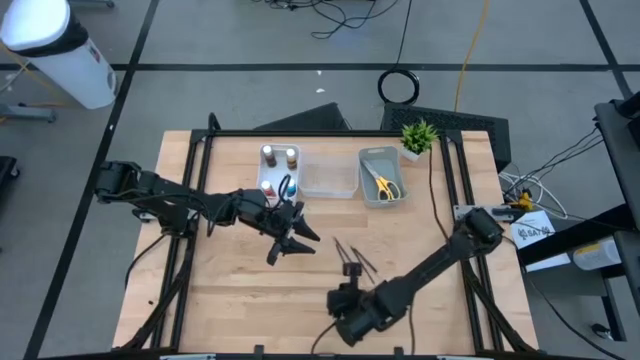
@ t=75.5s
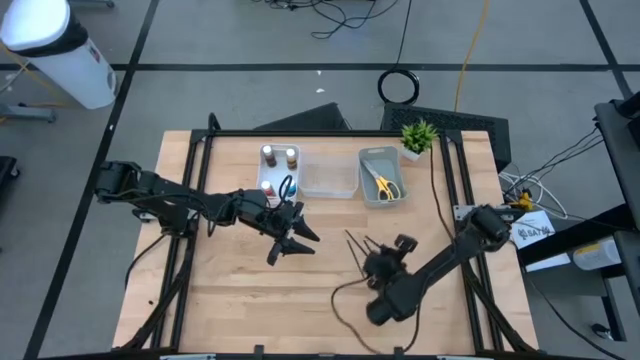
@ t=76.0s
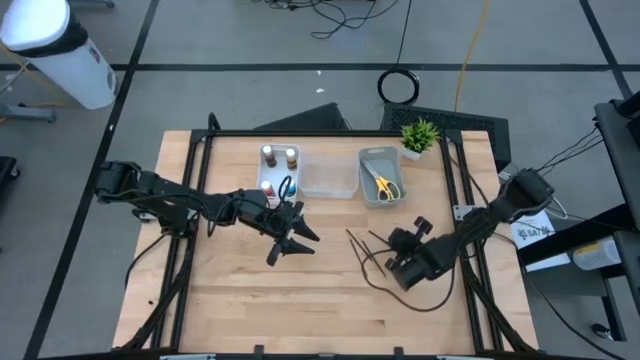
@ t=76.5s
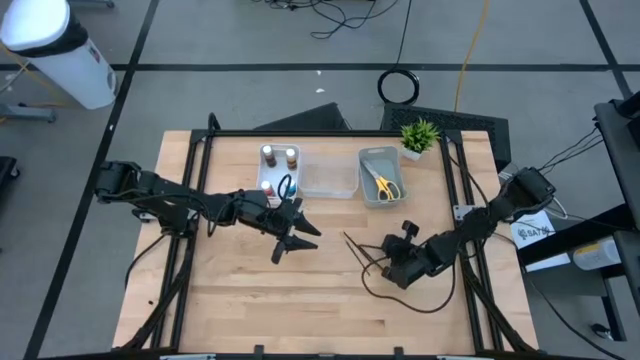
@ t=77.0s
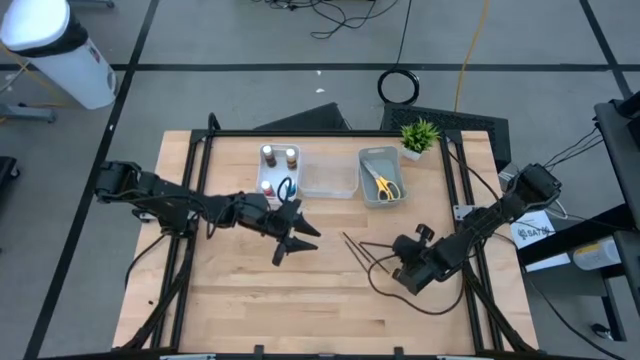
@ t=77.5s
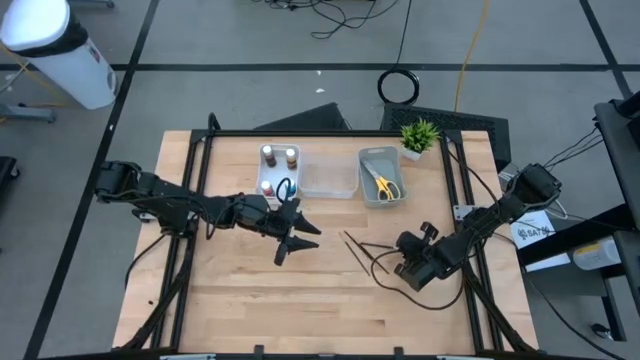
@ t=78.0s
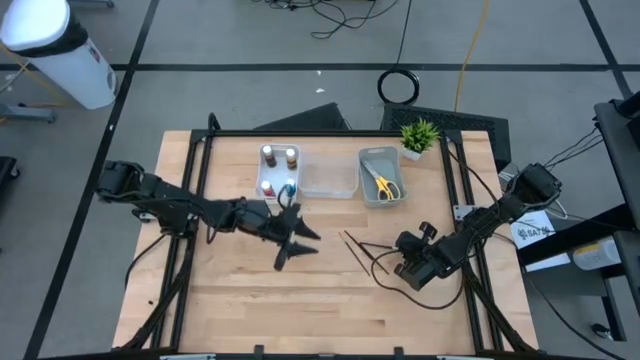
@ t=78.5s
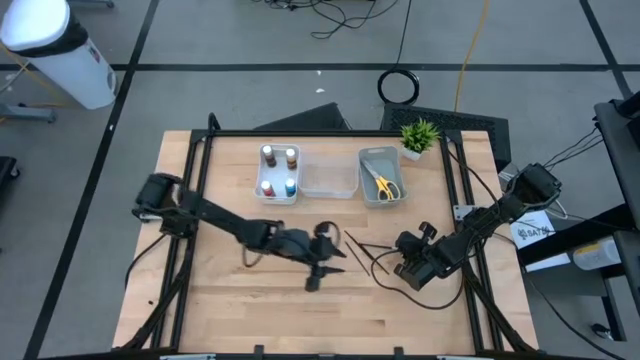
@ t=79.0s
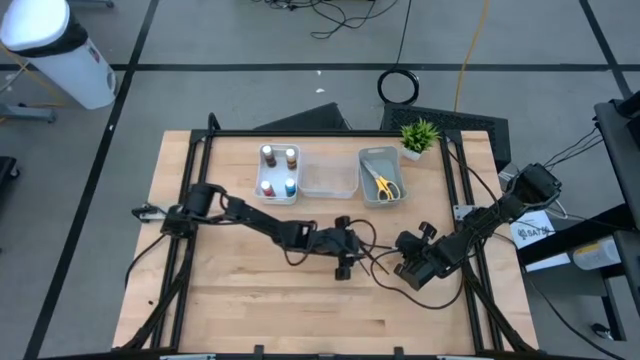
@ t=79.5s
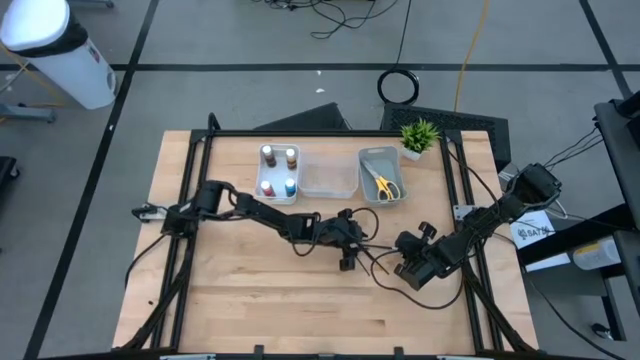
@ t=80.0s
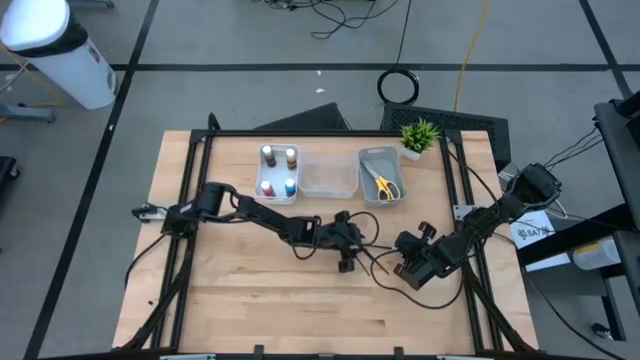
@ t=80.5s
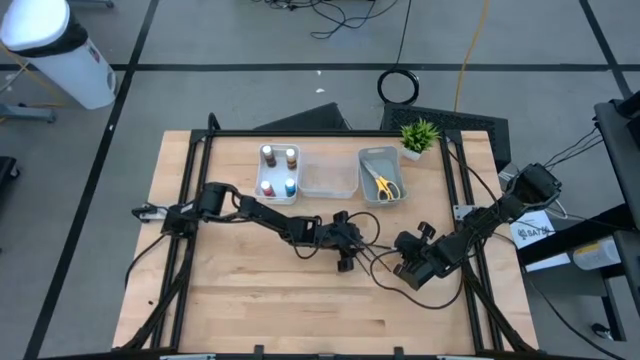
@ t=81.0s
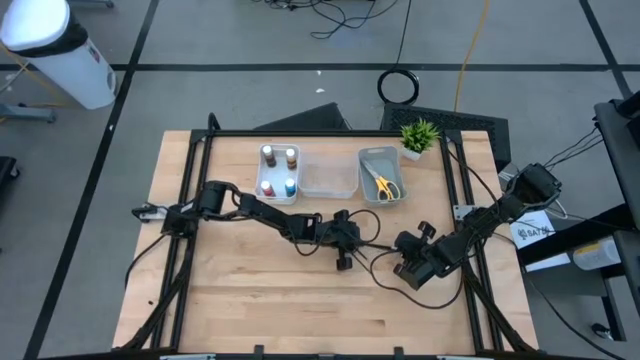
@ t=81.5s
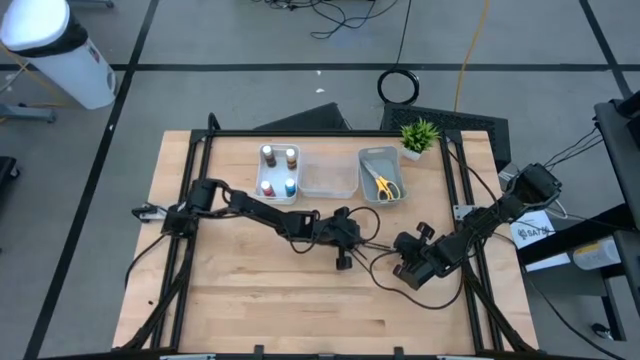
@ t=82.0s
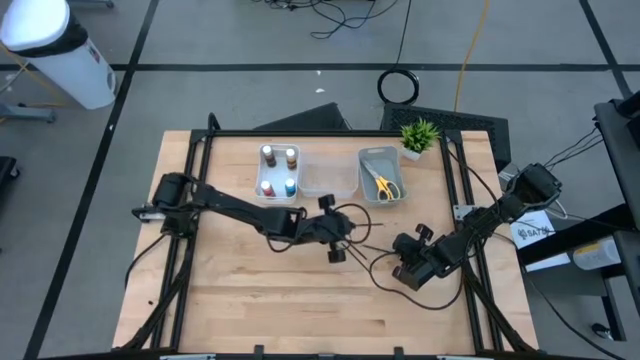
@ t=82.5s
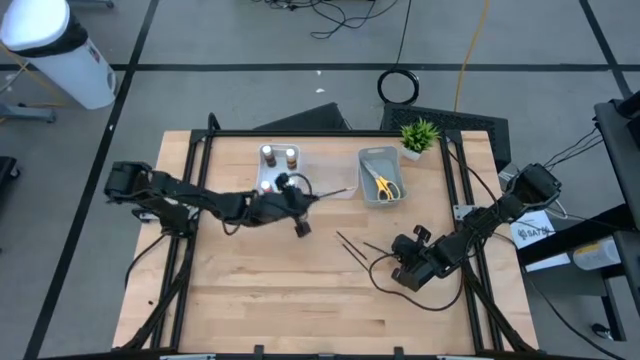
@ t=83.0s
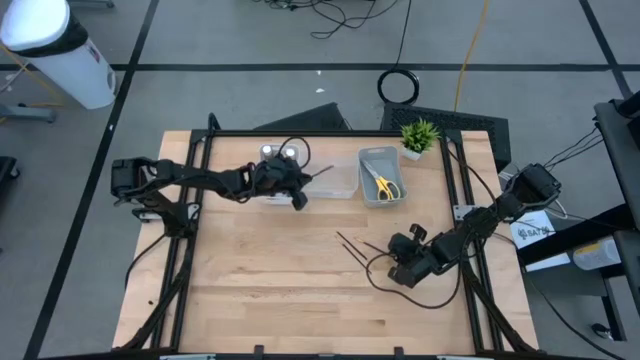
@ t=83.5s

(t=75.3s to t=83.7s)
Task: Pick & Place Paint Supplies
Put the silver paint brush in the transparent bin

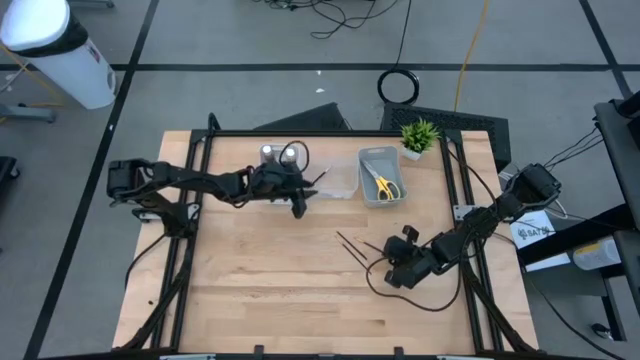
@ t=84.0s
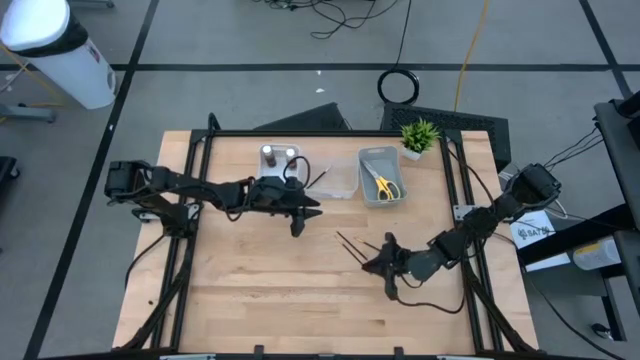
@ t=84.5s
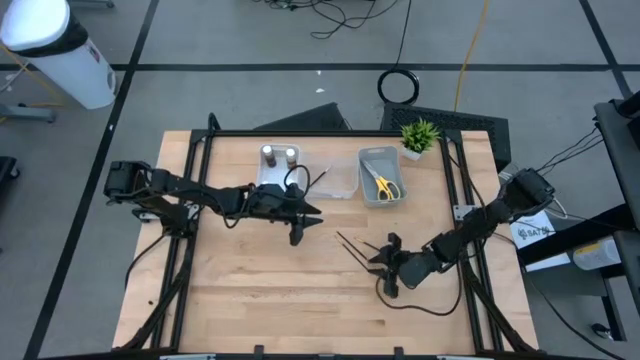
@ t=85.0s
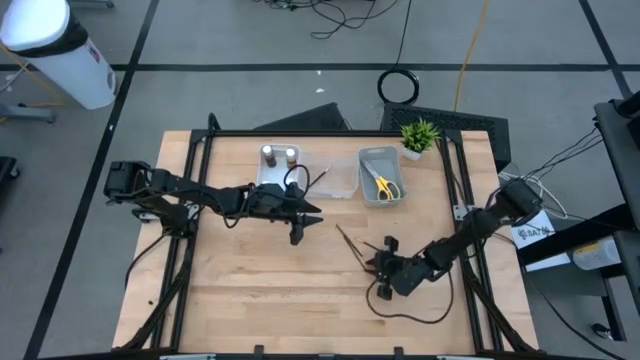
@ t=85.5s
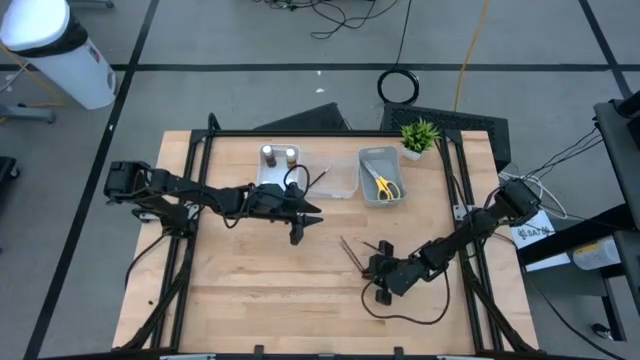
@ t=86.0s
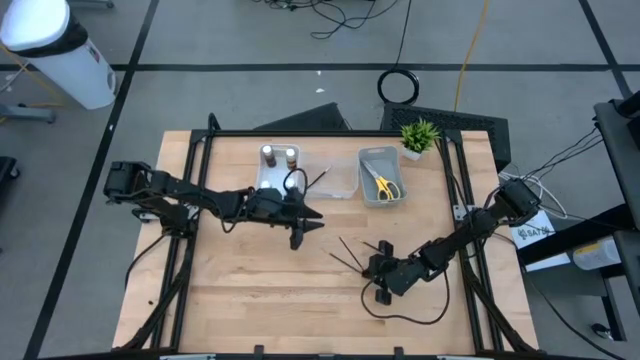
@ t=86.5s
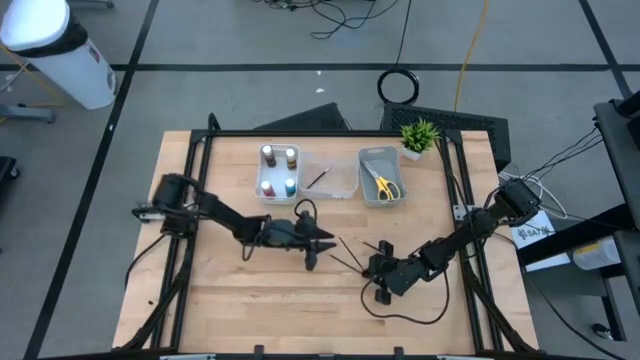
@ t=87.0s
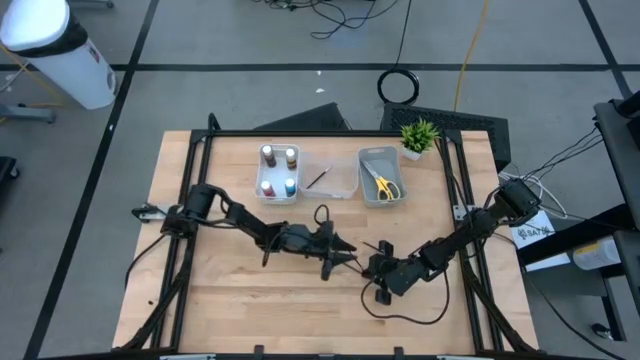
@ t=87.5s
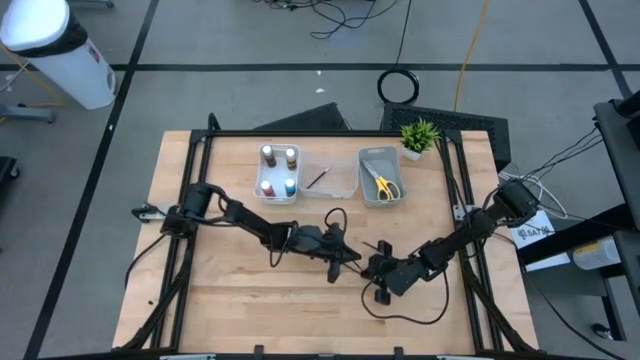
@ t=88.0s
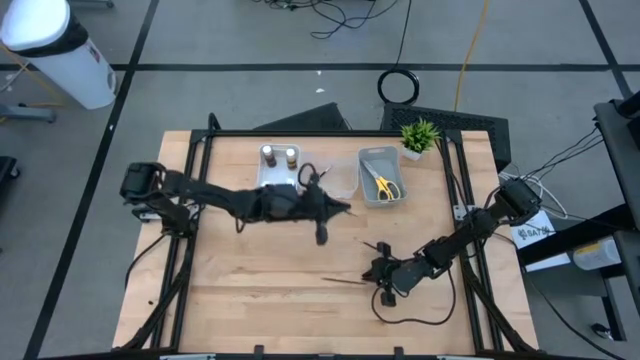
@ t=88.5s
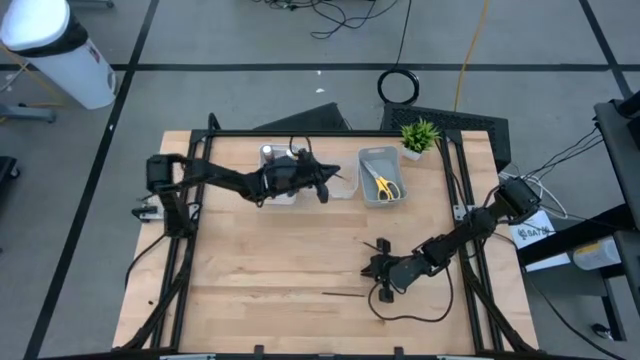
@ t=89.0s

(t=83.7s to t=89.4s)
Put the gold paint brush in the transparent bin

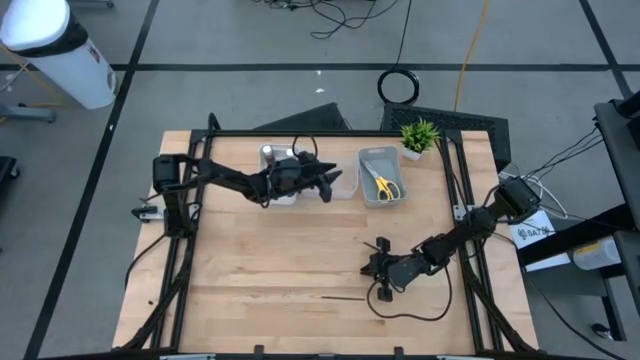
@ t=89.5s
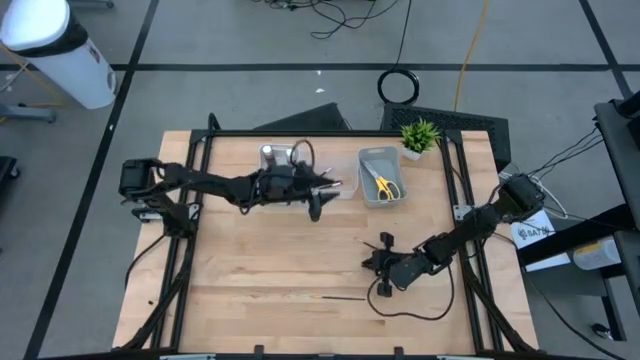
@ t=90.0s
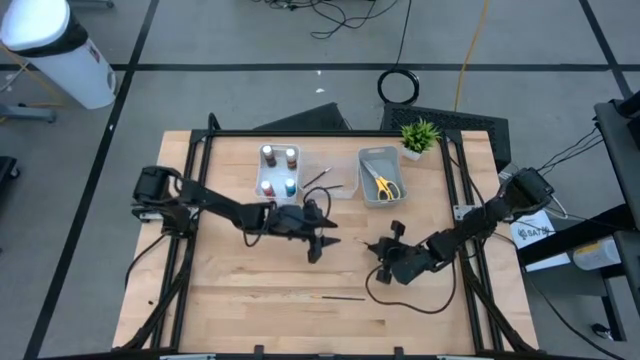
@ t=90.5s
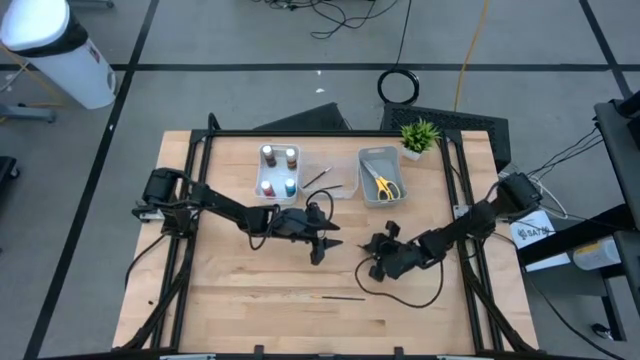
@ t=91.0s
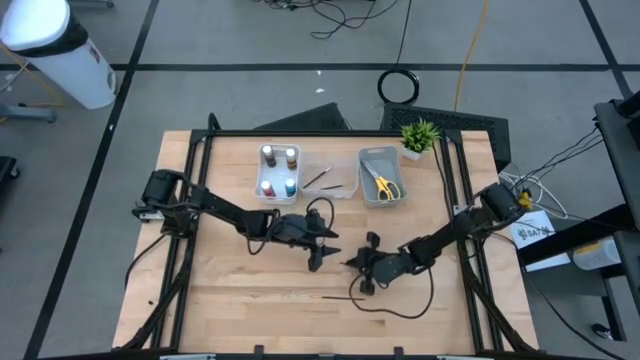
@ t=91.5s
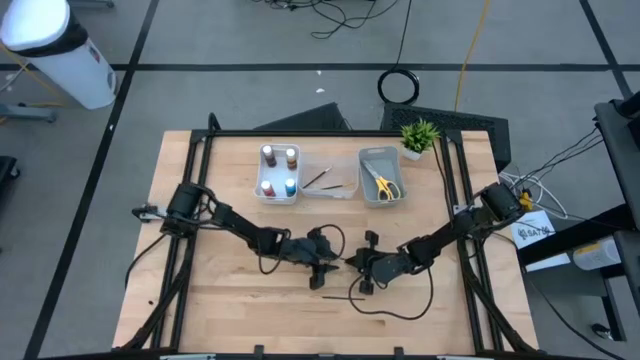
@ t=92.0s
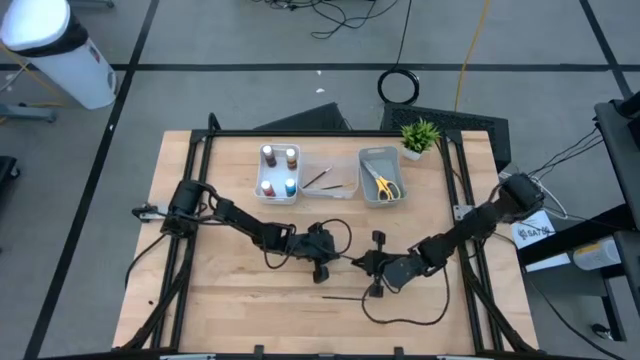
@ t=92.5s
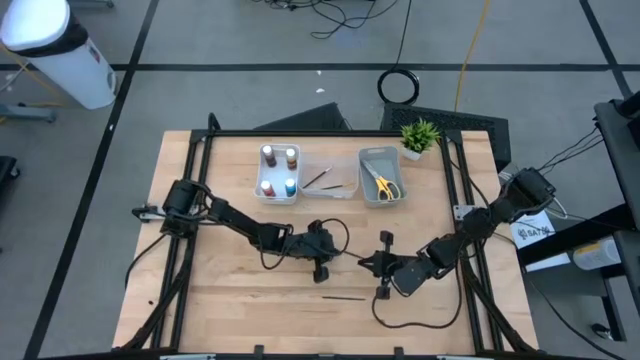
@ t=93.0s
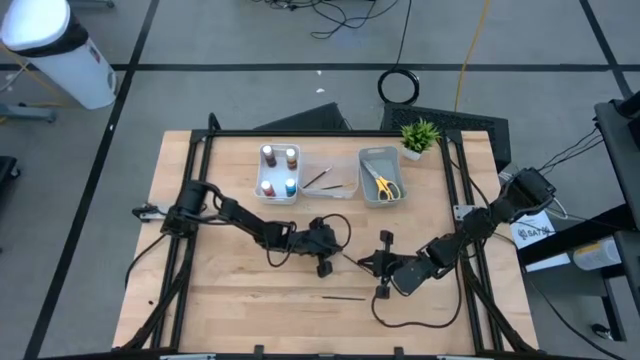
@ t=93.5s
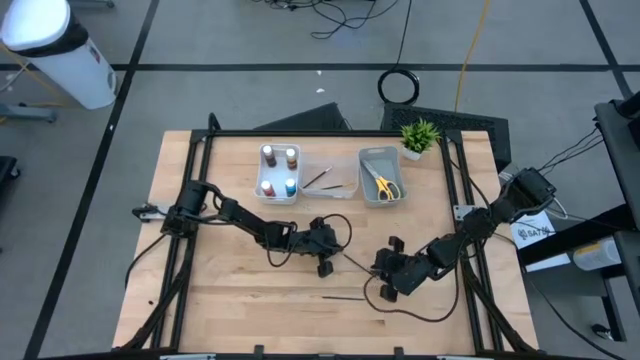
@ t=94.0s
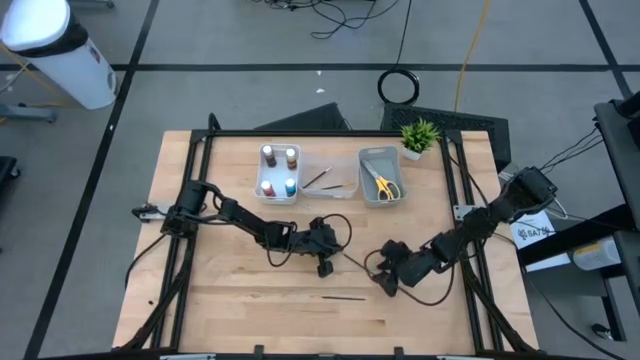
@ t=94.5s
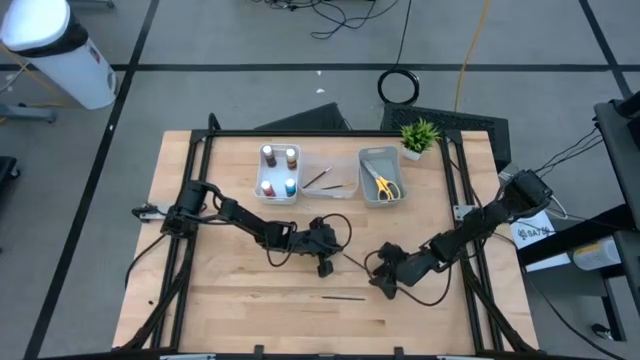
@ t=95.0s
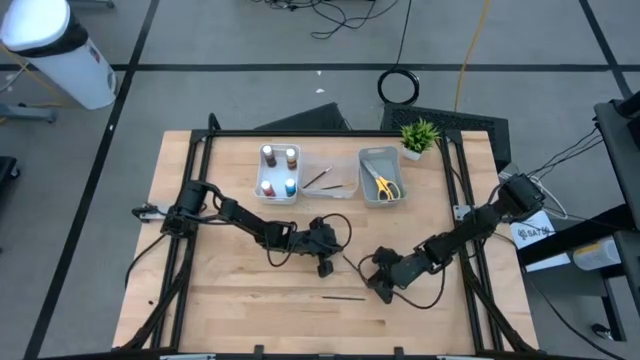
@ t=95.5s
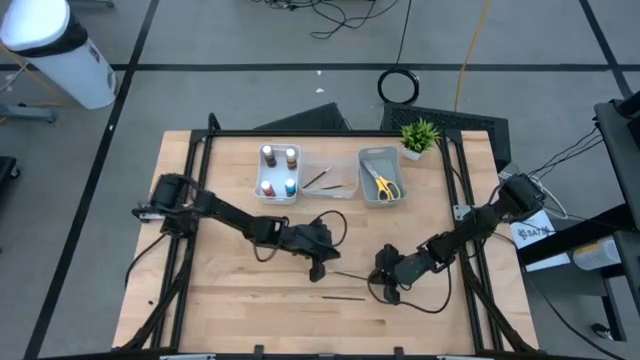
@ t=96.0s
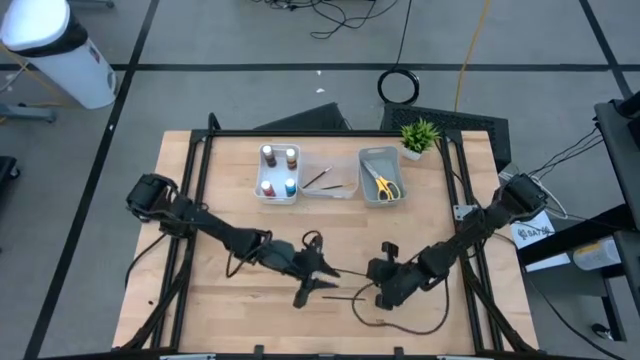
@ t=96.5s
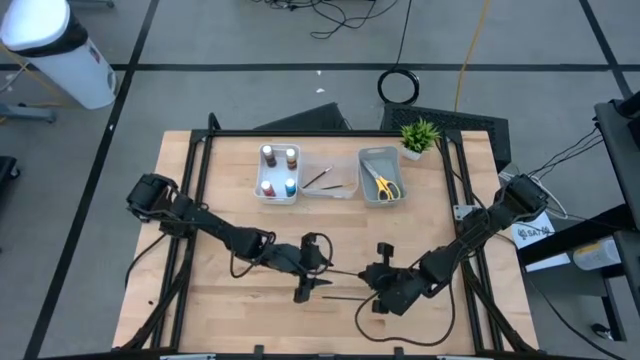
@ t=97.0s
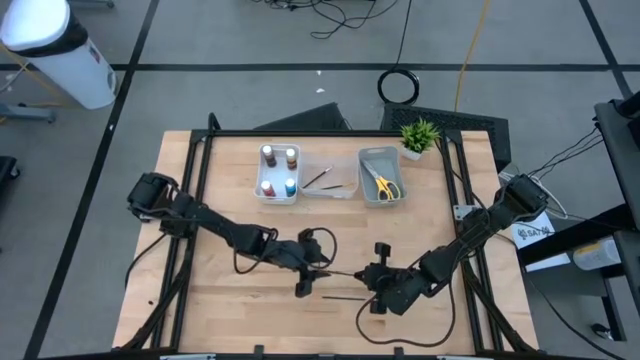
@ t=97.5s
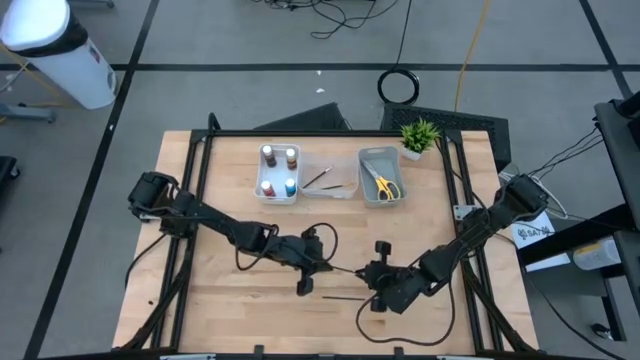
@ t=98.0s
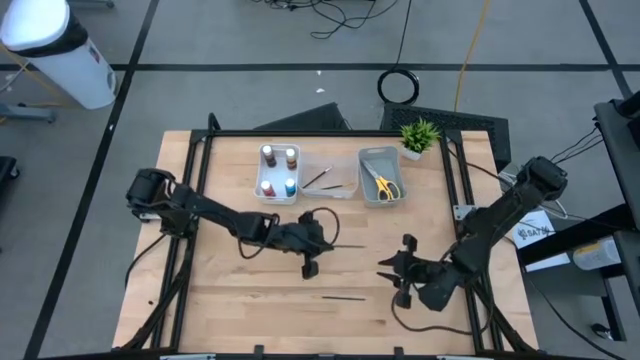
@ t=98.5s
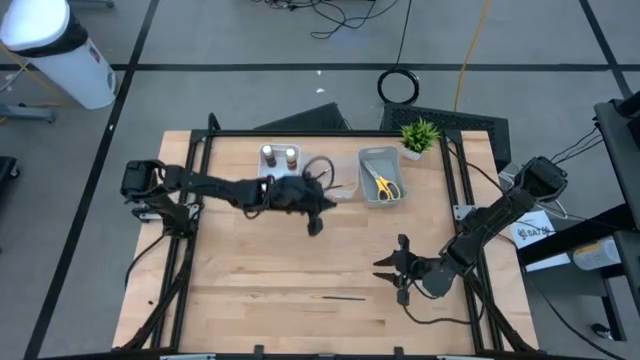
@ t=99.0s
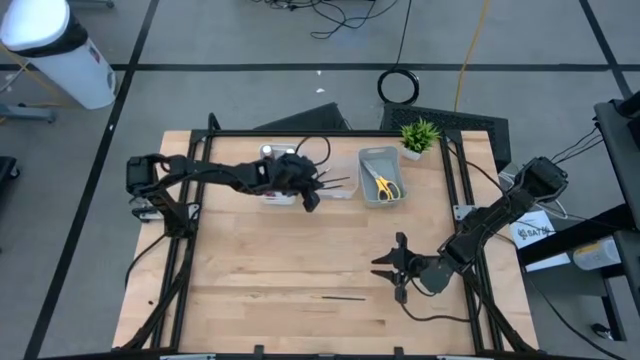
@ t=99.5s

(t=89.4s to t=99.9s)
Put the gold paint brush in the transparent bin
